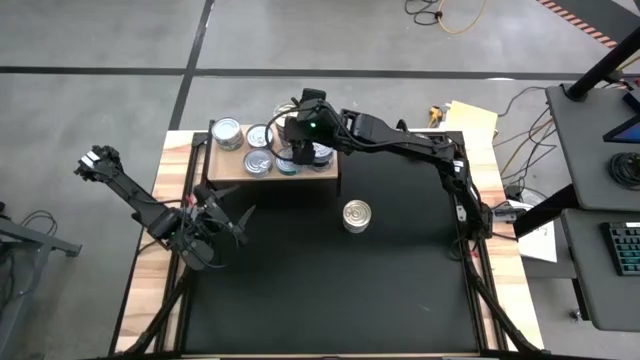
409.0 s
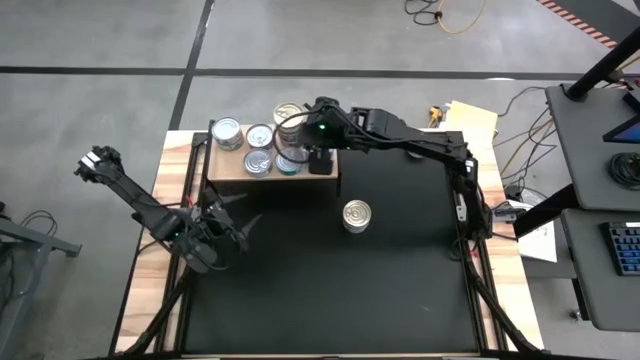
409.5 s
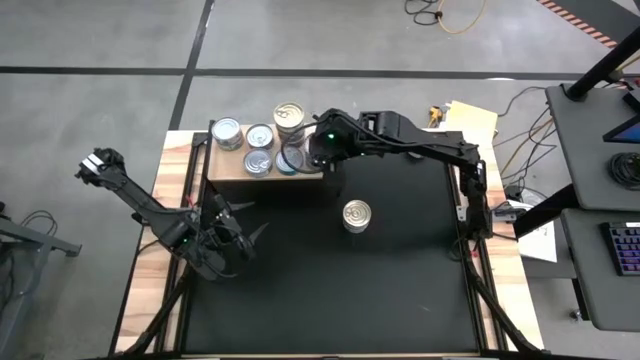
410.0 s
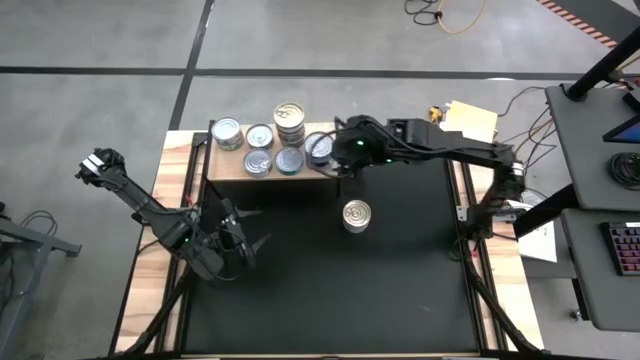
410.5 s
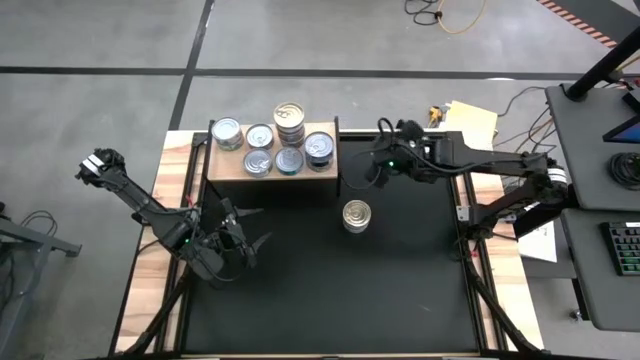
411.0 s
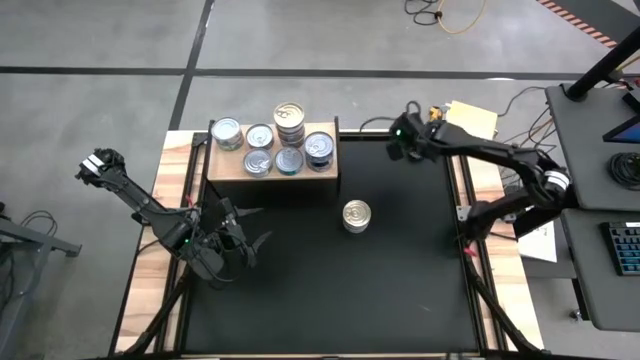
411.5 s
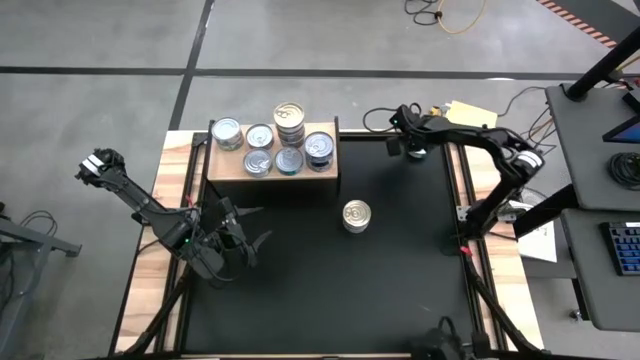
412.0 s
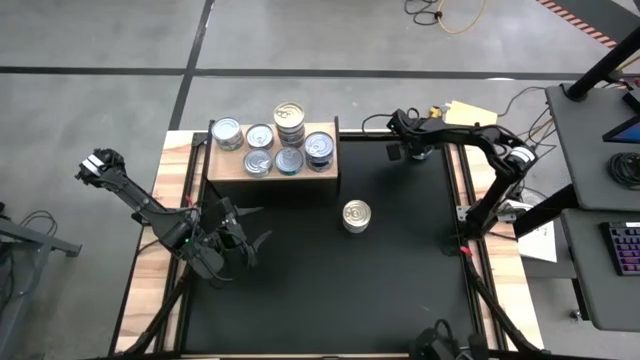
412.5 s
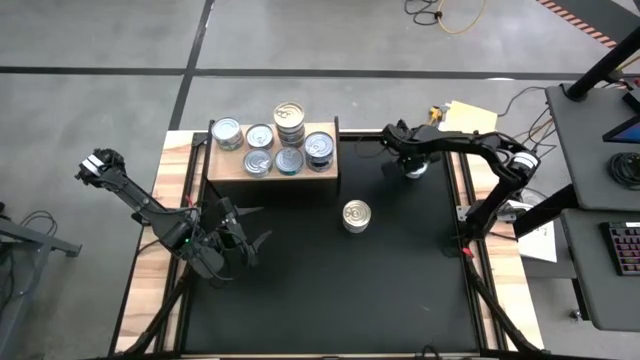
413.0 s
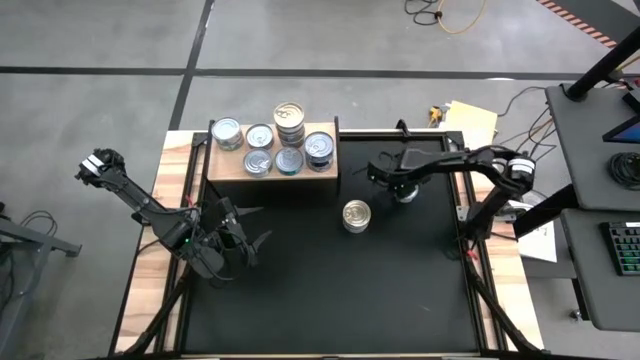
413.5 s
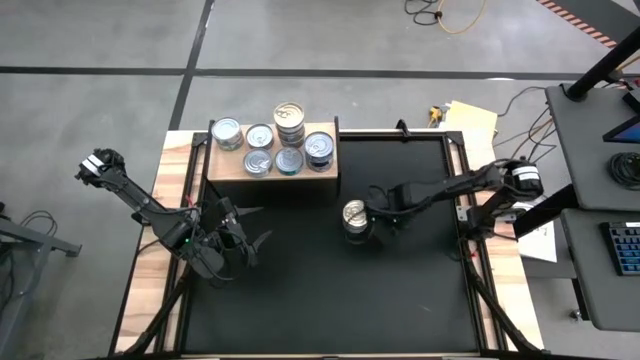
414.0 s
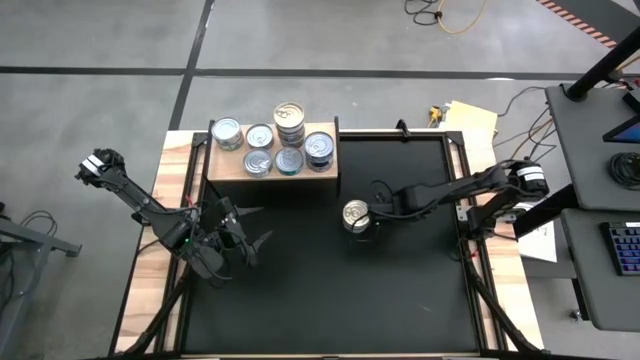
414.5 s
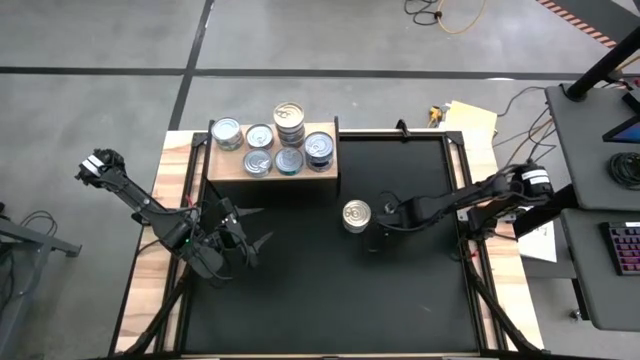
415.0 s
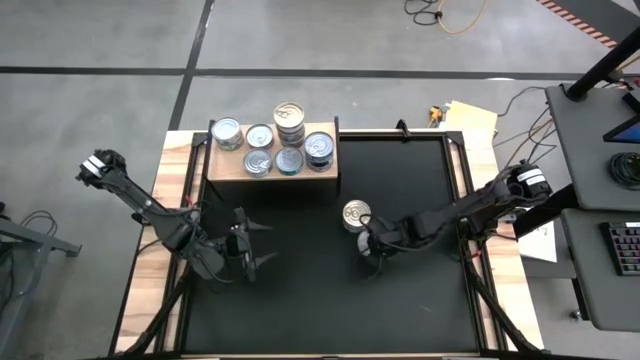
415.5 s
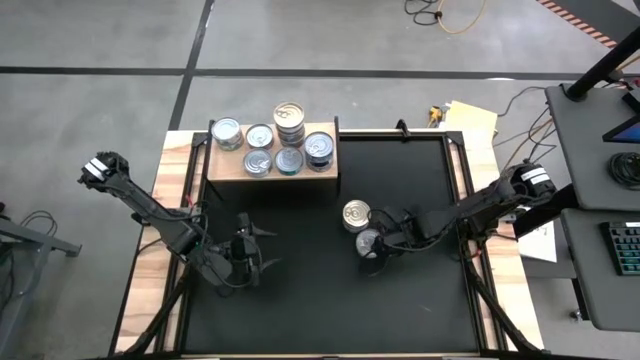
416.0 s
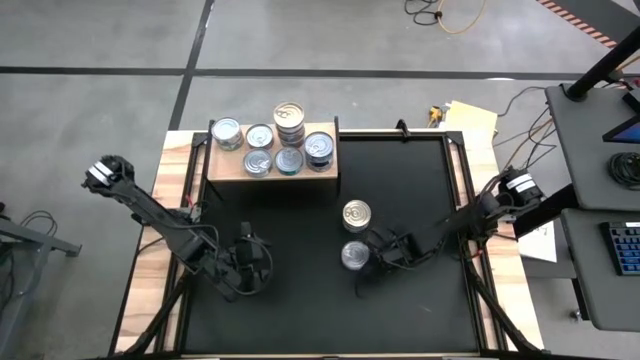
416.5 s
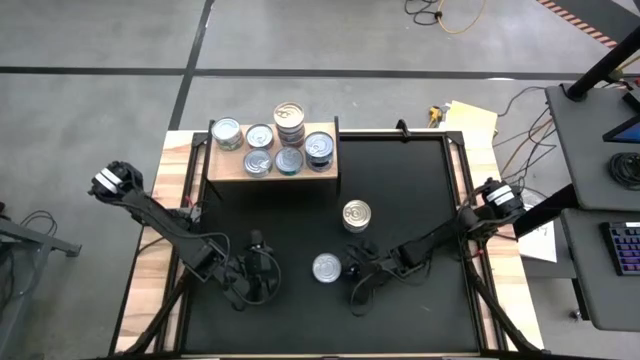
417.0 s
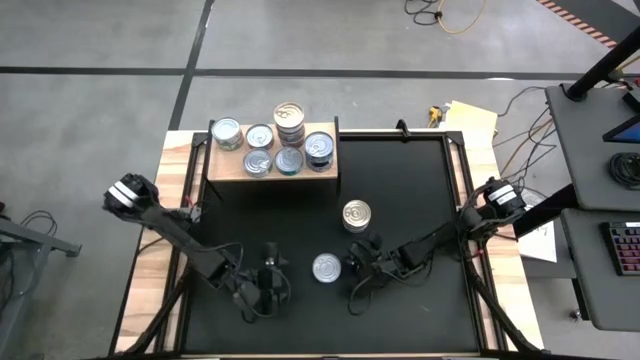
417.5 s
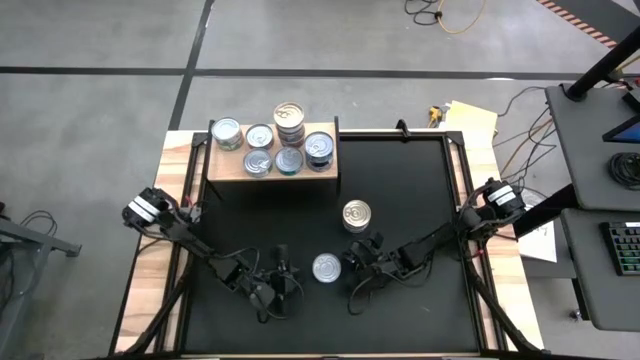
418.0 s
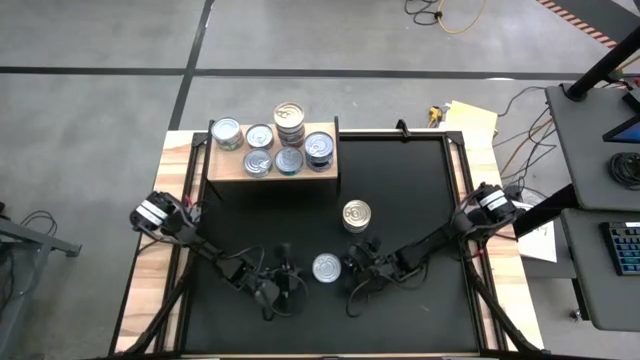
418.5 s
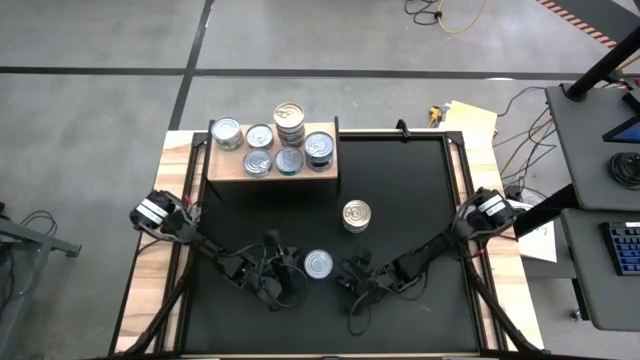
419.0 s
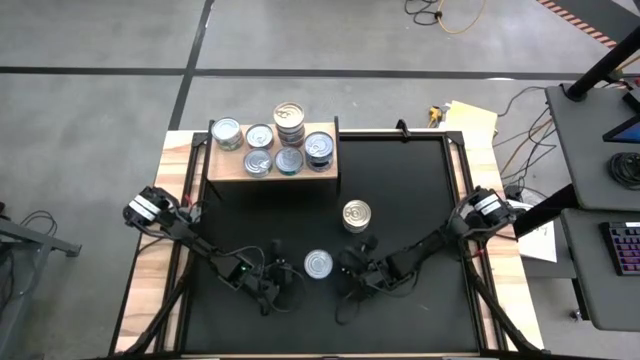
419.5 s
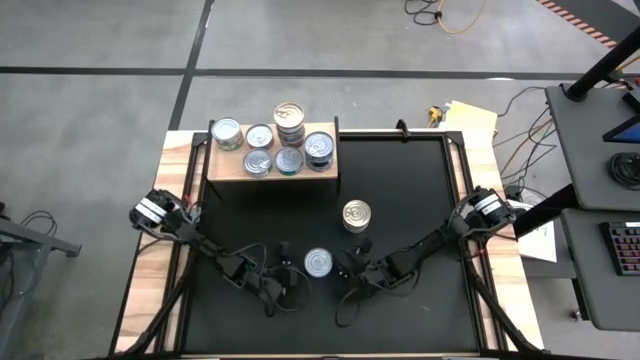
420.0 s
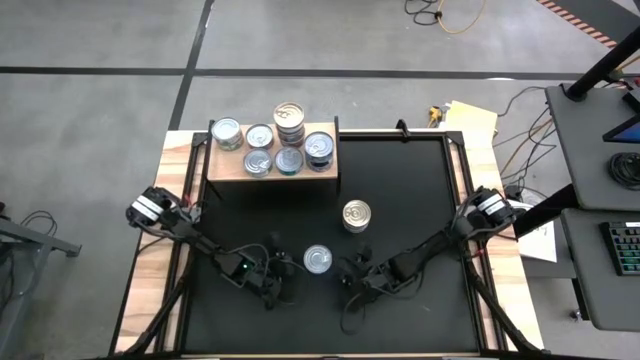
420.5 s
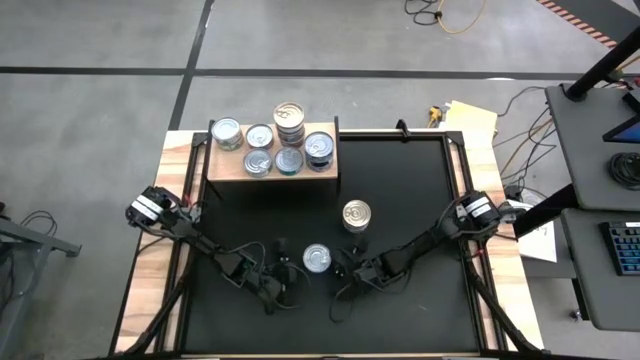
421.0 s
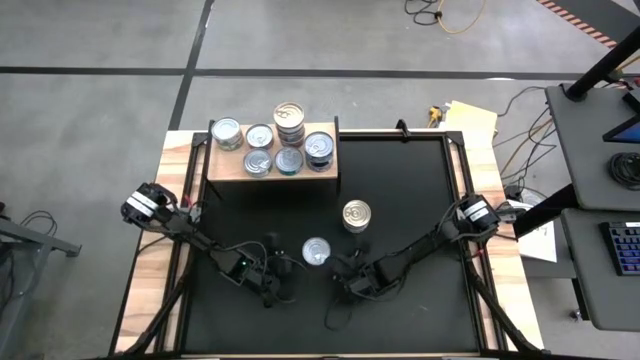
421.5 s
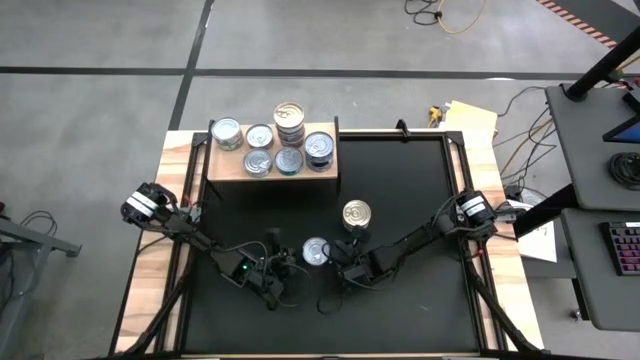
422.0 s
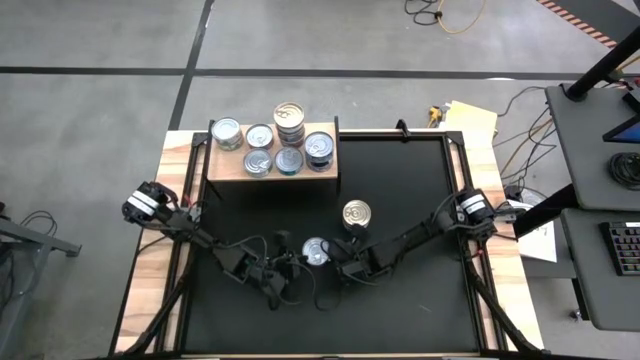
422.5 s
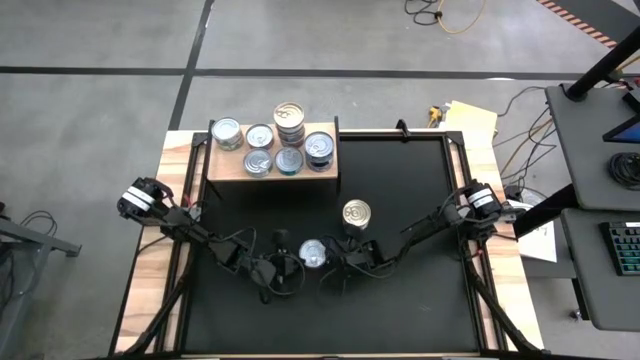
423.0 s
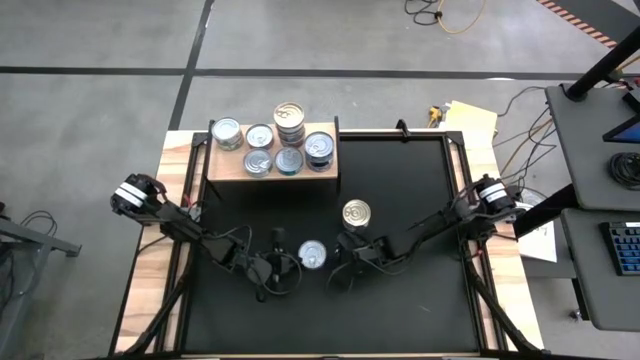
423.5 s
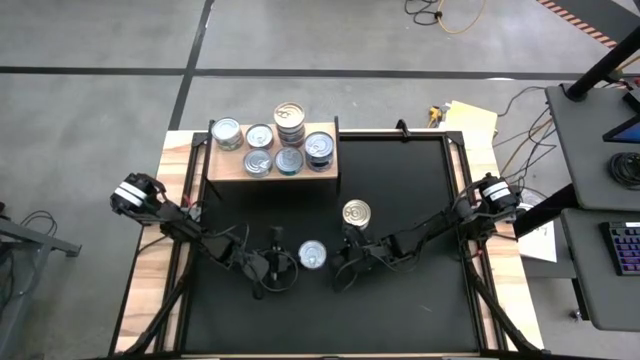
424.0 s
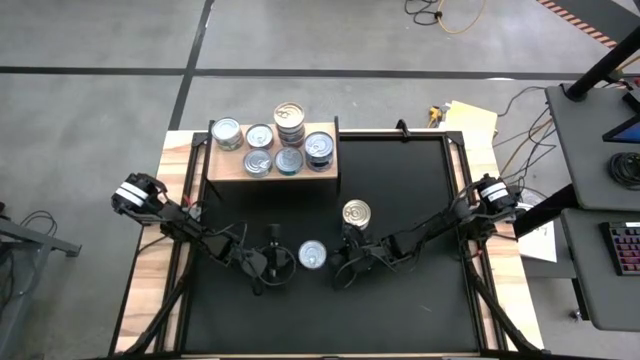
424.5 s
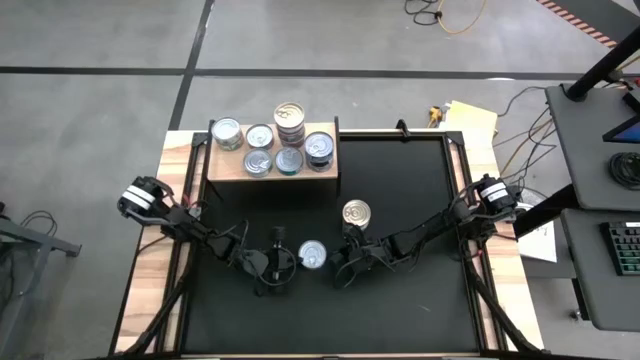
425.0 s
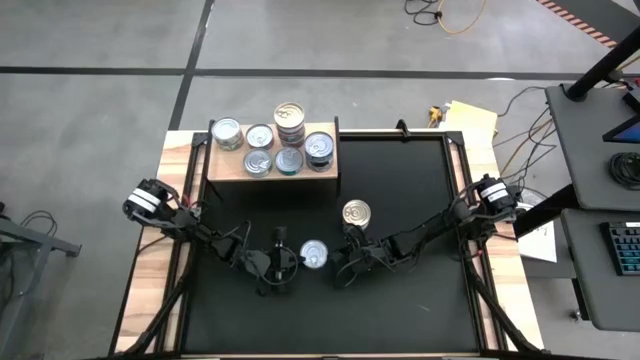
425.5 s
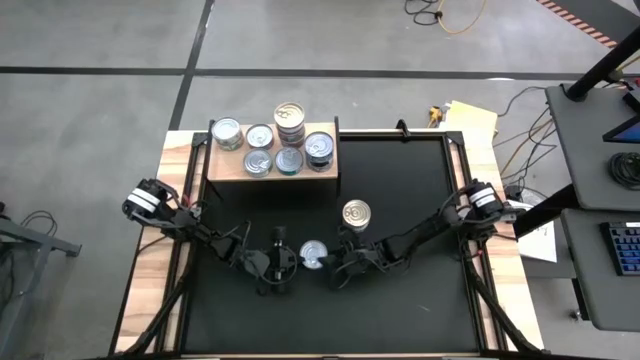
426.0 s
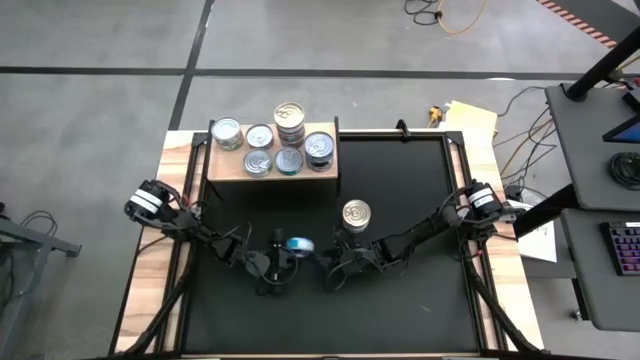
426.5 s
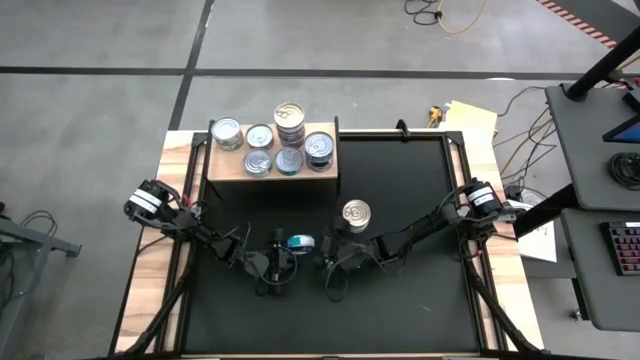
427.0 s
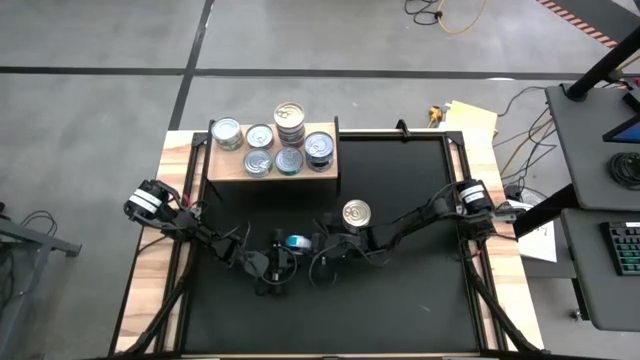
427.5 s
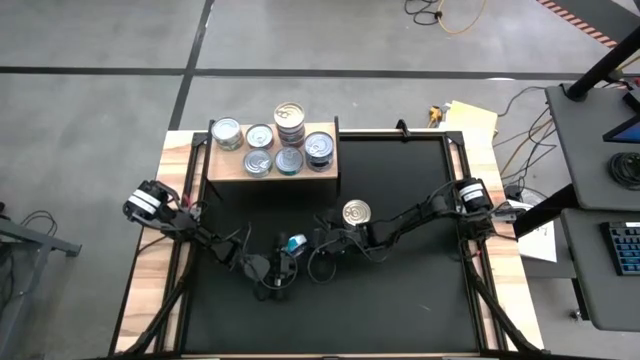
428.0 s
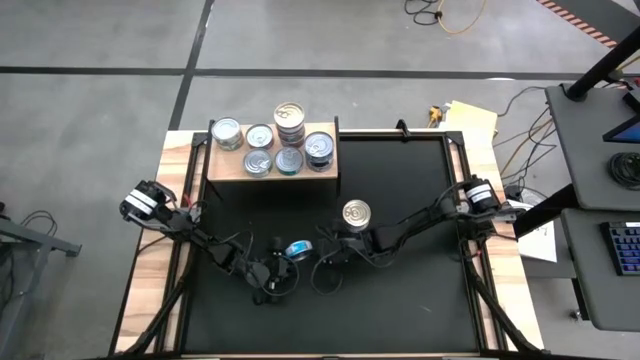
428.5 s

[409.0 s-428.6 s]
Task: Stack canned seafood by type on shelf
Put the yellow/blue tuna can on the shelf

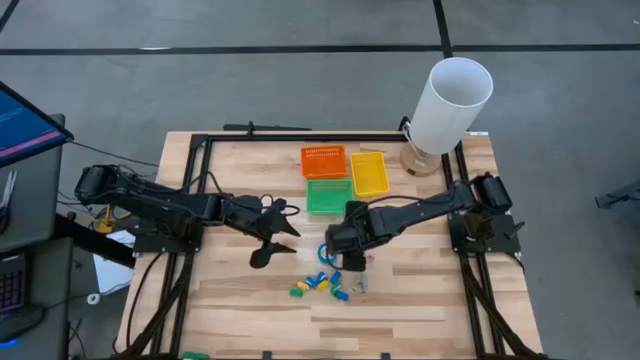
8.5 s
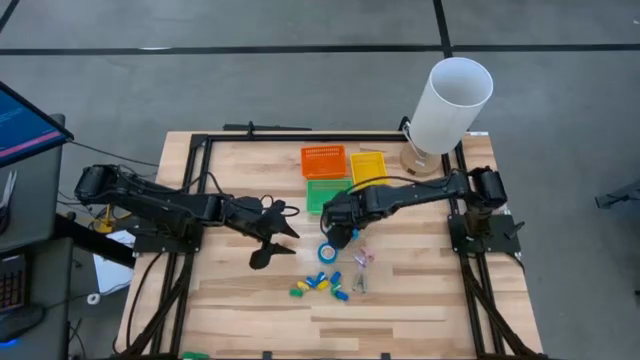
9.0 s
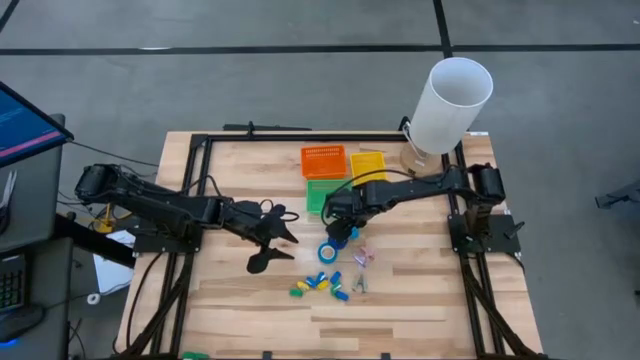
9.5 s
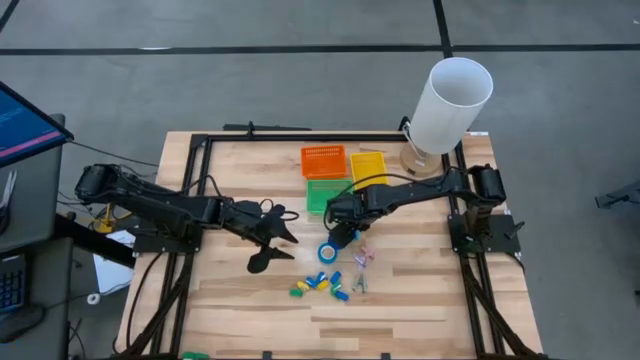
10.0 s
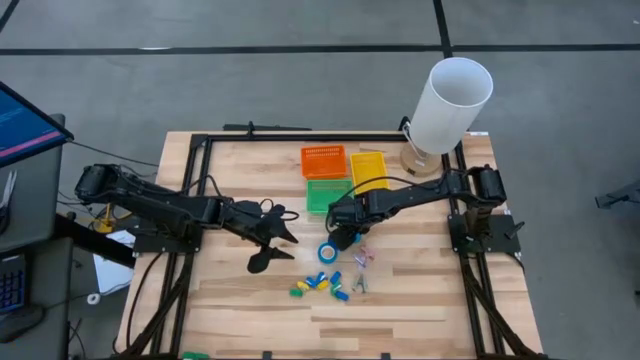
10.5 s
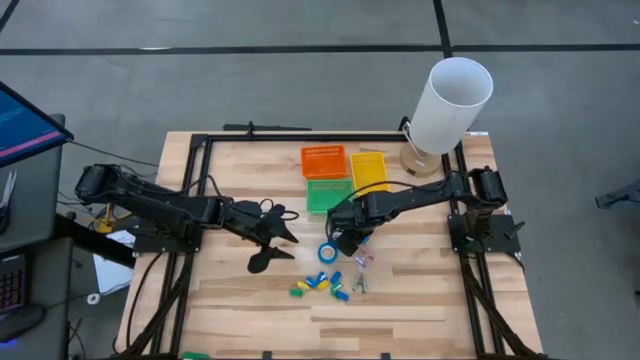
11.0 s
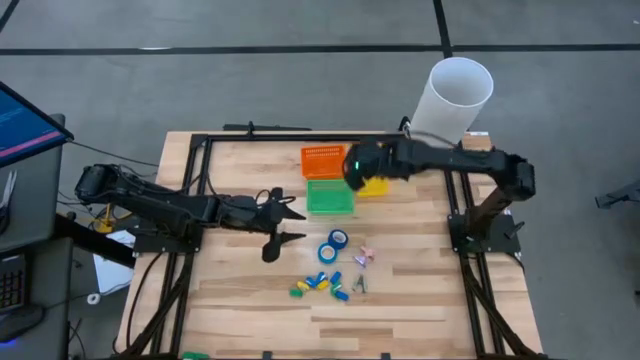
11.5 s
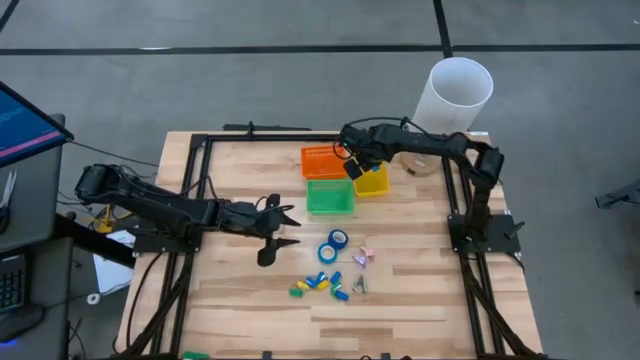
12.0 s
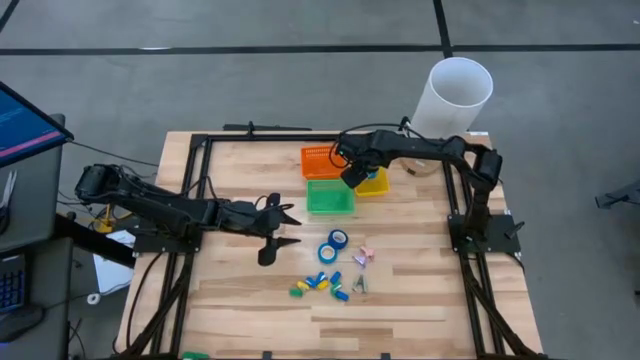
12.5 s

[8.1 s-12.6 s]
Task: Pick and place Stapler, Stapler remover, tape
Put the light blue tape into the yellow bin
